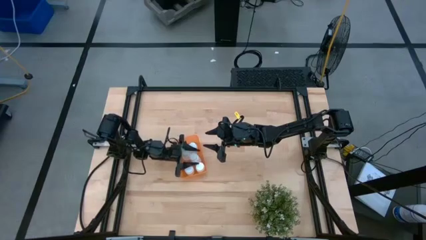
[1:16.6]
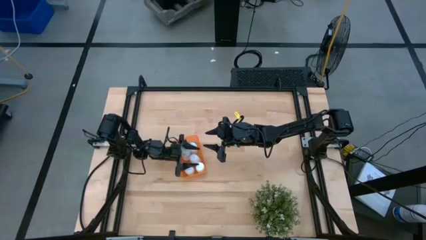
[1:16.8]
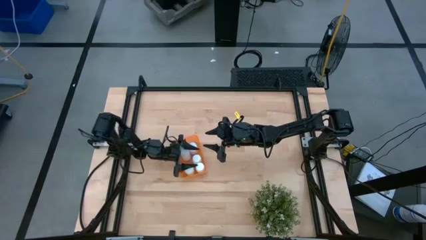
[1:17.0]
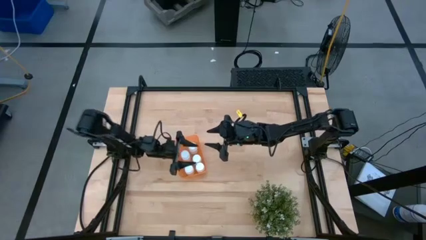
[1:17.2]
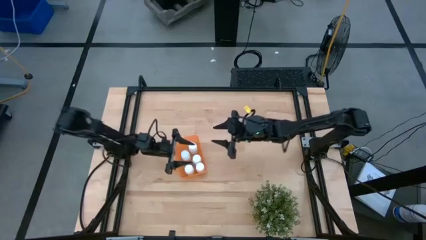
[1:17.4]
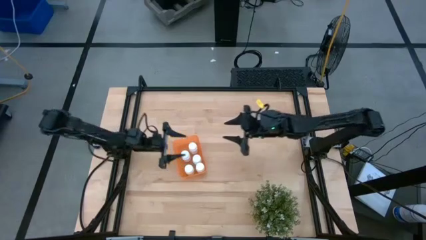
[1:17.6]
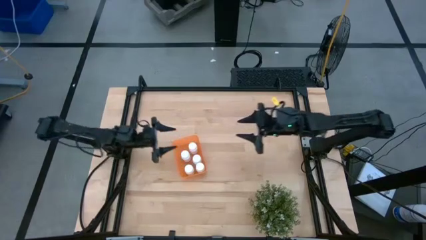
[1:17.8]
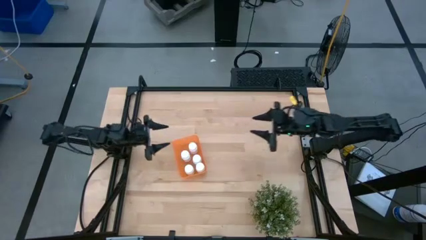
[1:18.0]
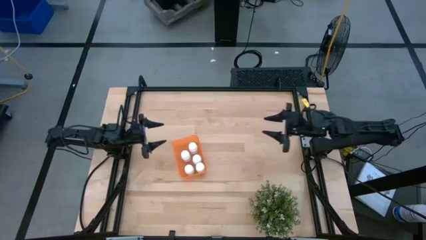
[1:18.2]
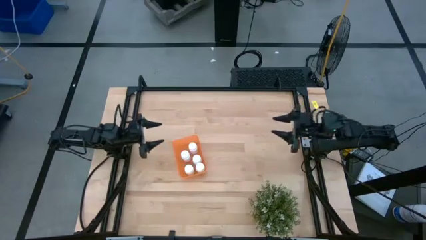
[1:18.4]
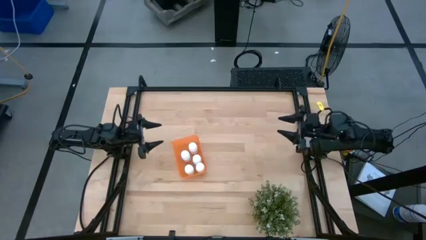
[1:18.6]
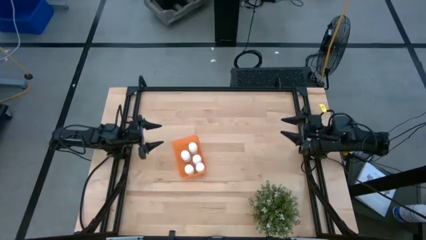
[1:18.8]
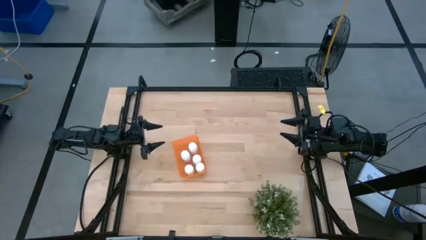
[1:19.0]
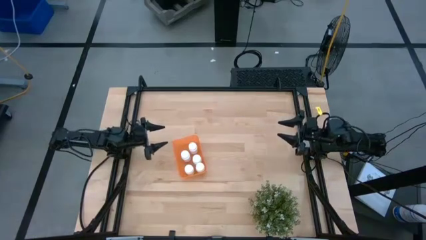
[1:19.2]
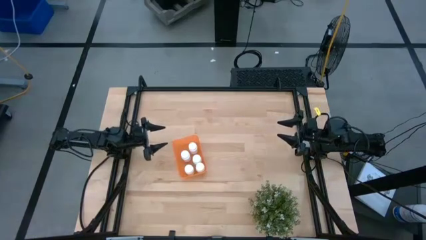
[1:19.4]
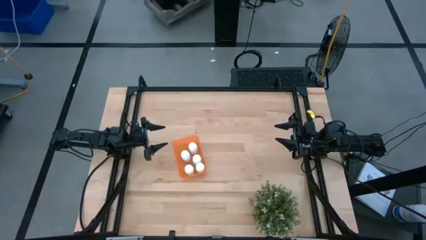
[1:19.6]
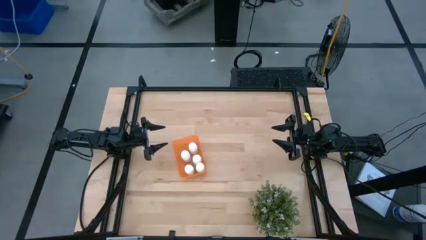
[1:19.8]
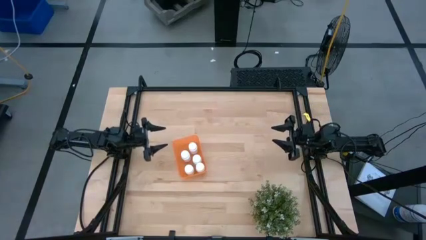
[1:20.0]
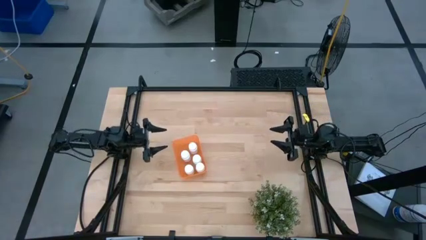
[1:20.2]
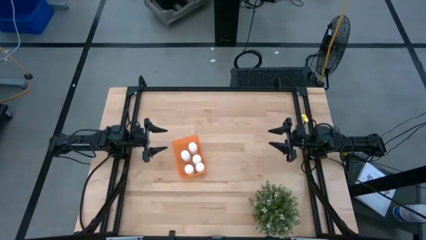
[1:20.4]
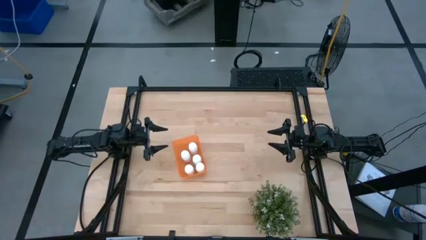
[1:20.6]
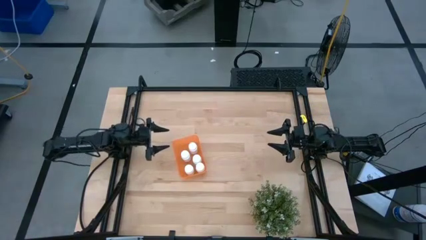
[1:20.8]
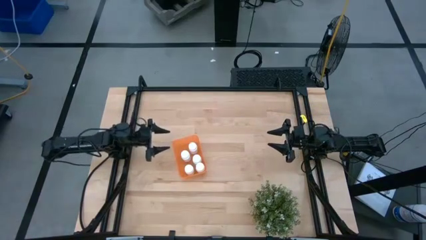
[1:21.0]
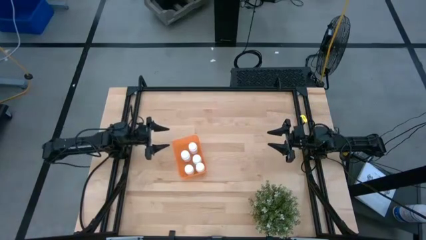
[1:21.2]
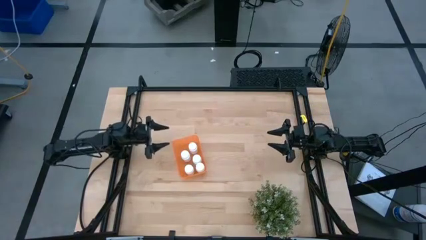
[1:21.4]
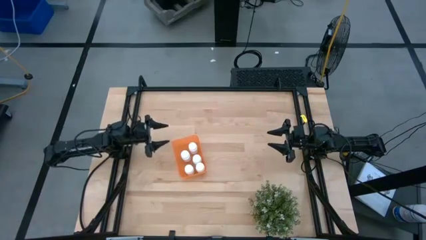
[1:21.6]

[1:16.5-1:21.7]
Task: Pick and place pill bottles into a basket
Return to Home Position

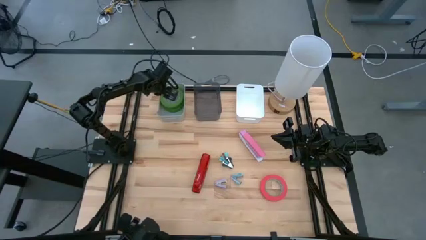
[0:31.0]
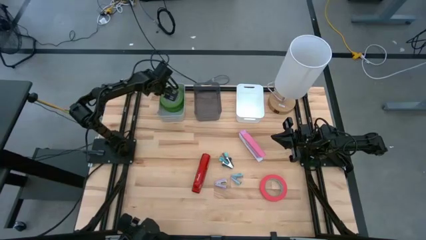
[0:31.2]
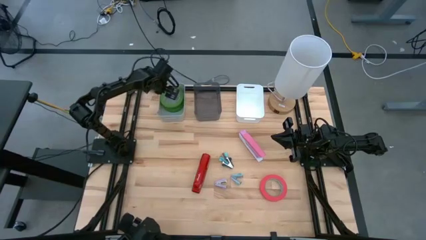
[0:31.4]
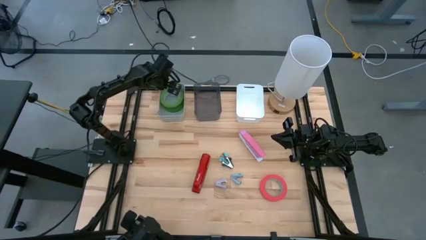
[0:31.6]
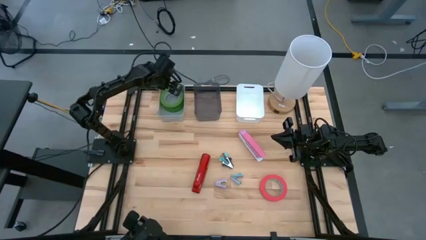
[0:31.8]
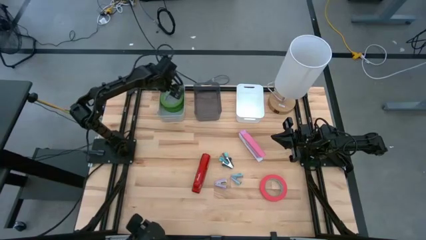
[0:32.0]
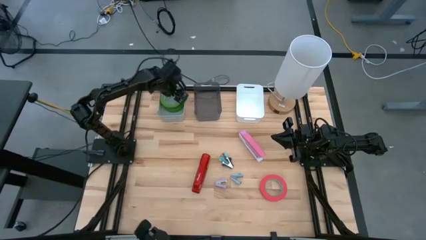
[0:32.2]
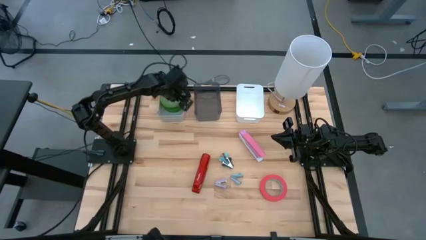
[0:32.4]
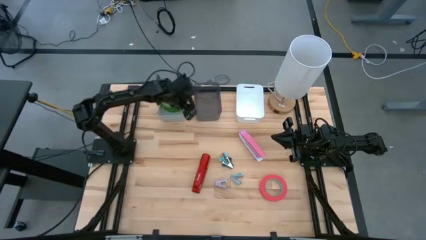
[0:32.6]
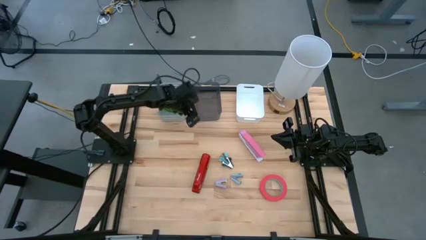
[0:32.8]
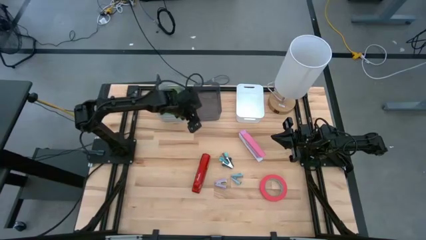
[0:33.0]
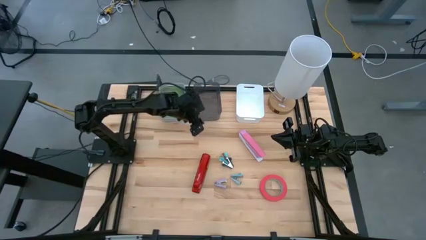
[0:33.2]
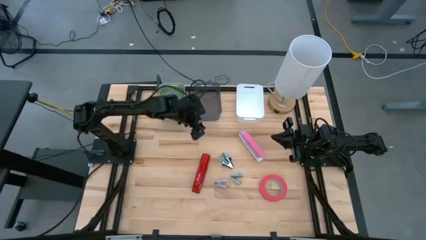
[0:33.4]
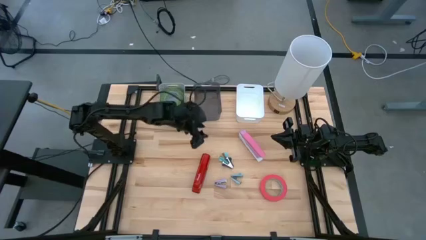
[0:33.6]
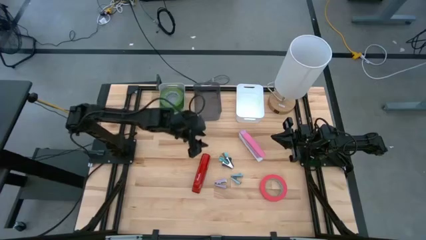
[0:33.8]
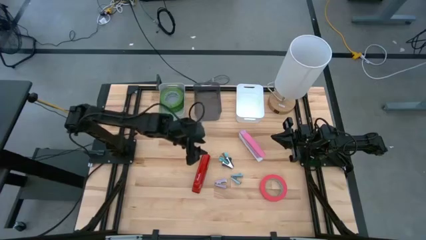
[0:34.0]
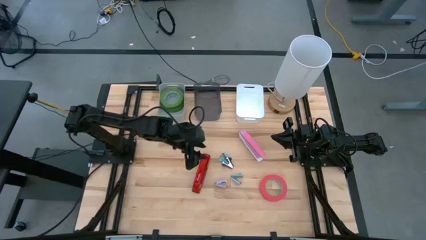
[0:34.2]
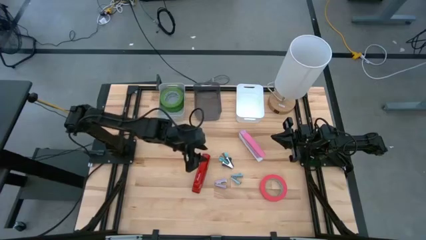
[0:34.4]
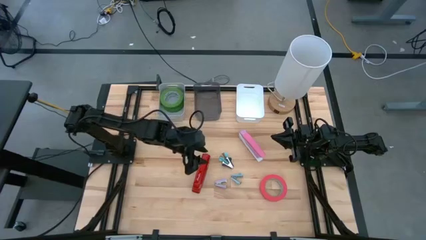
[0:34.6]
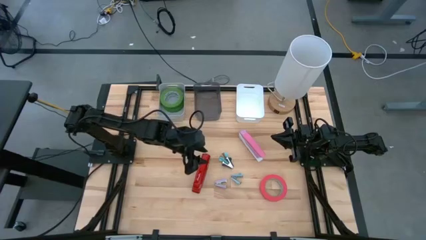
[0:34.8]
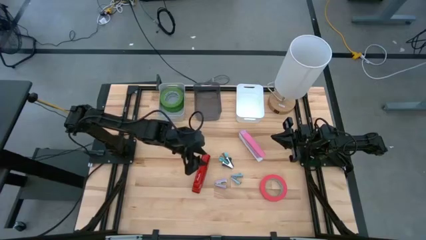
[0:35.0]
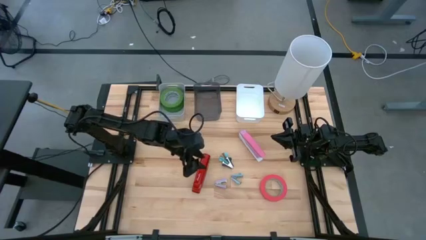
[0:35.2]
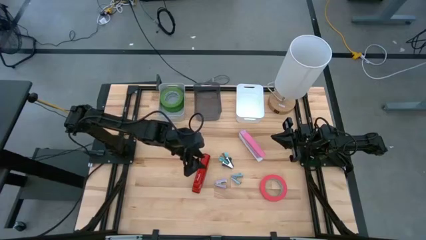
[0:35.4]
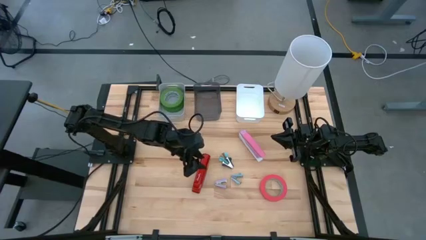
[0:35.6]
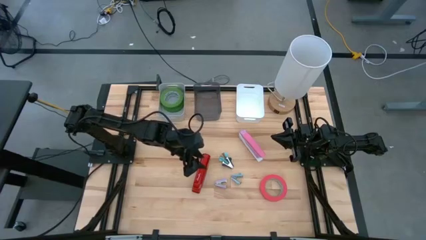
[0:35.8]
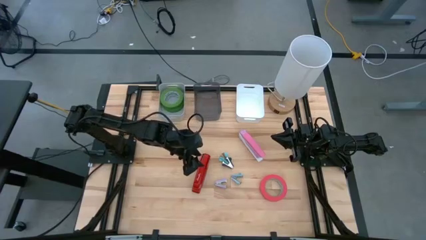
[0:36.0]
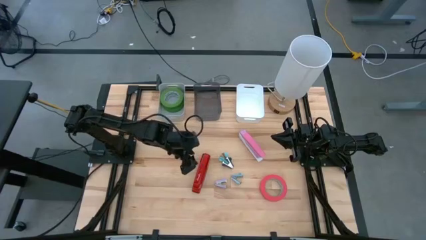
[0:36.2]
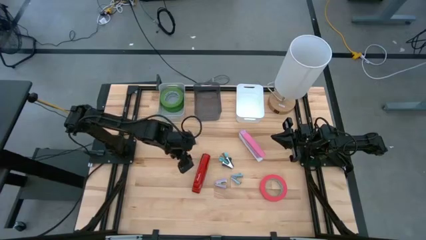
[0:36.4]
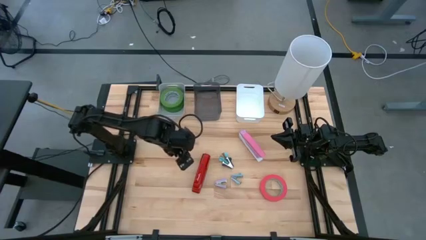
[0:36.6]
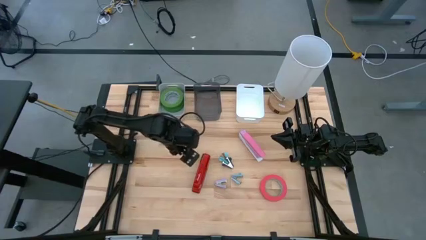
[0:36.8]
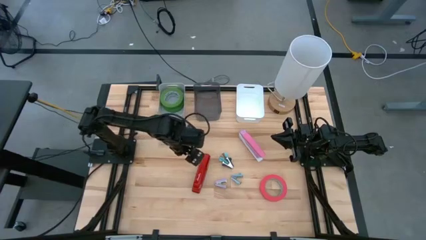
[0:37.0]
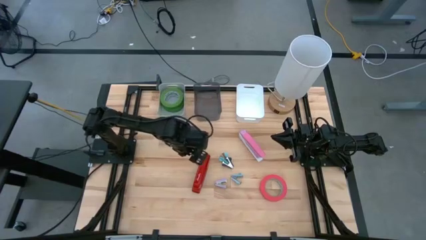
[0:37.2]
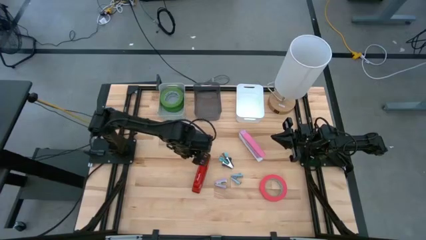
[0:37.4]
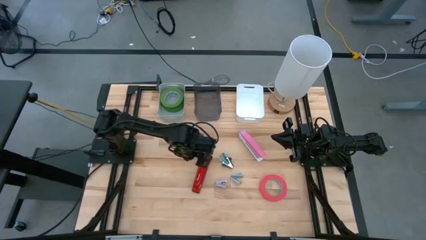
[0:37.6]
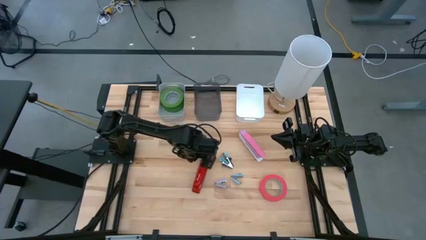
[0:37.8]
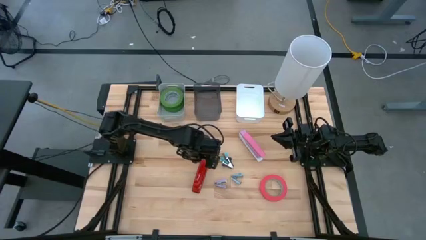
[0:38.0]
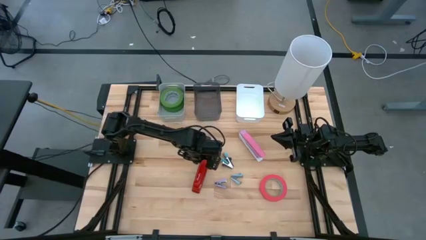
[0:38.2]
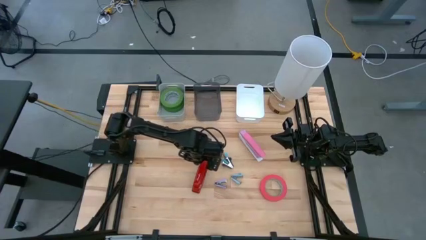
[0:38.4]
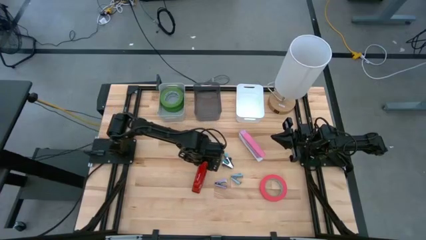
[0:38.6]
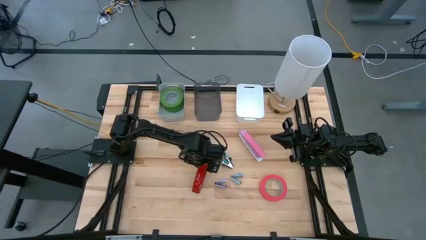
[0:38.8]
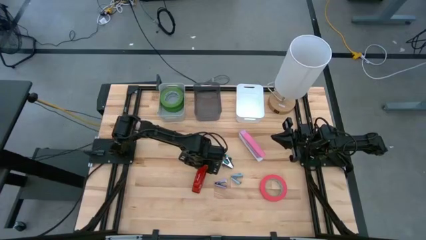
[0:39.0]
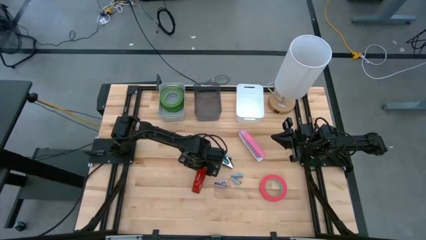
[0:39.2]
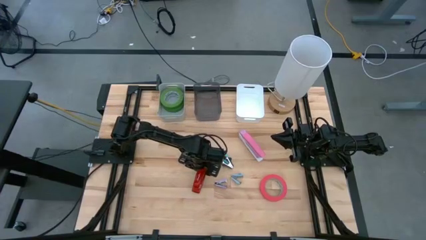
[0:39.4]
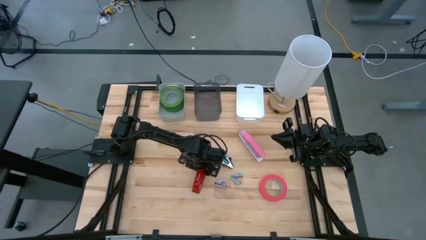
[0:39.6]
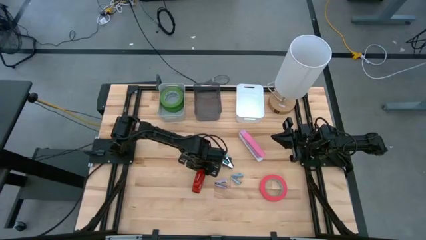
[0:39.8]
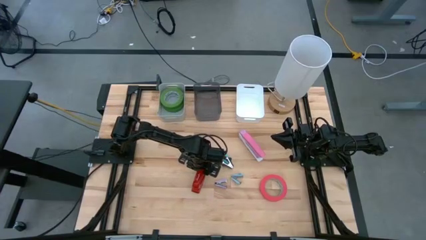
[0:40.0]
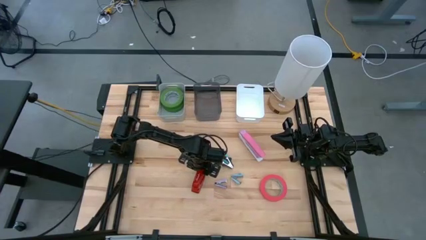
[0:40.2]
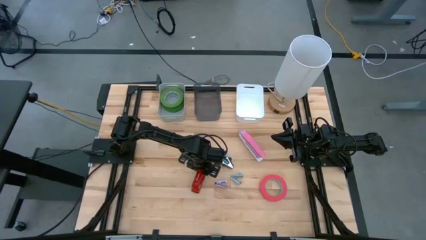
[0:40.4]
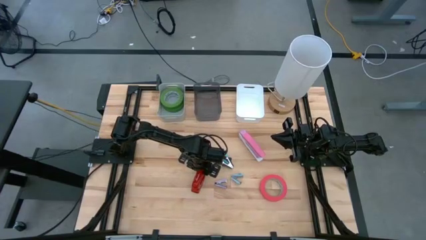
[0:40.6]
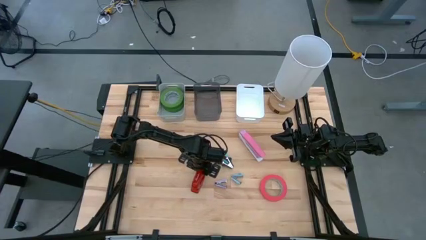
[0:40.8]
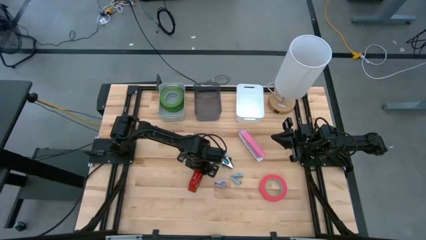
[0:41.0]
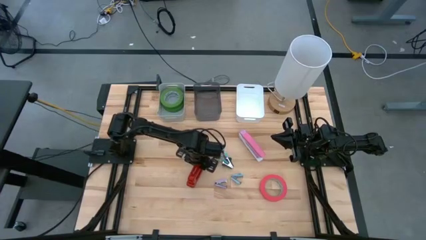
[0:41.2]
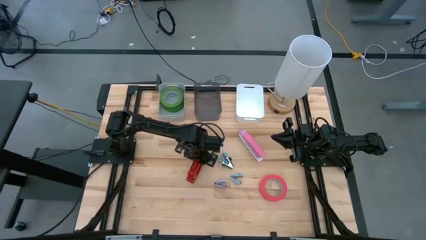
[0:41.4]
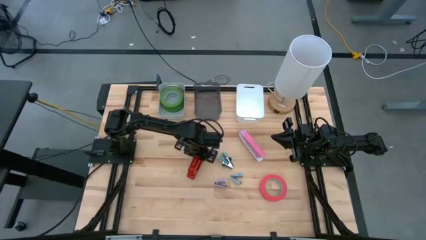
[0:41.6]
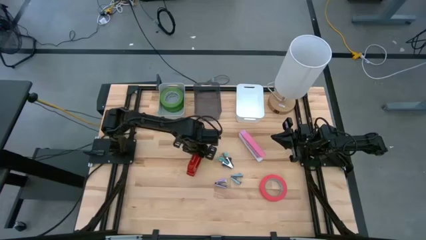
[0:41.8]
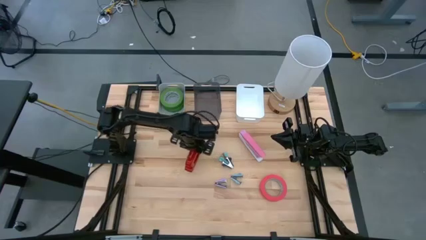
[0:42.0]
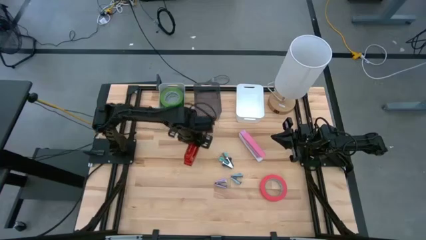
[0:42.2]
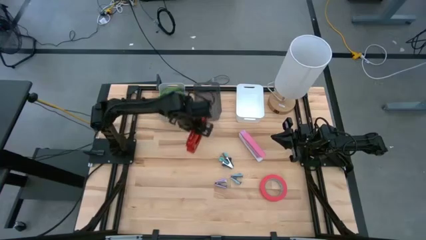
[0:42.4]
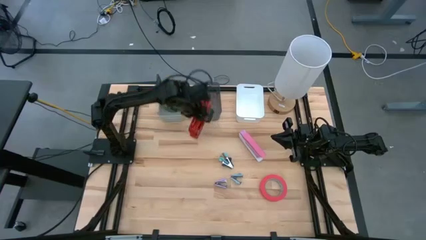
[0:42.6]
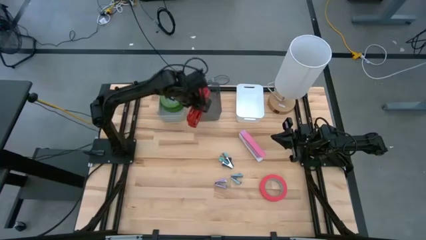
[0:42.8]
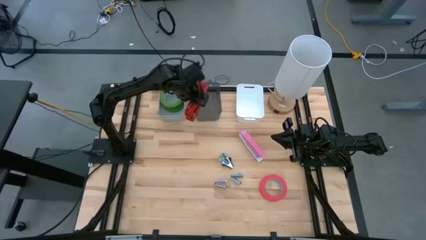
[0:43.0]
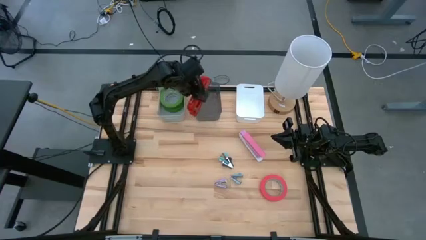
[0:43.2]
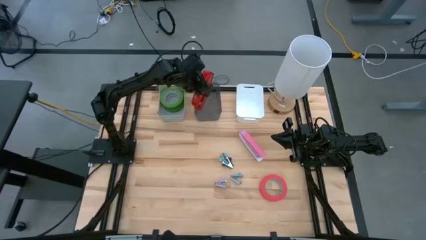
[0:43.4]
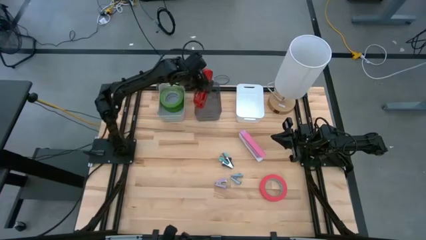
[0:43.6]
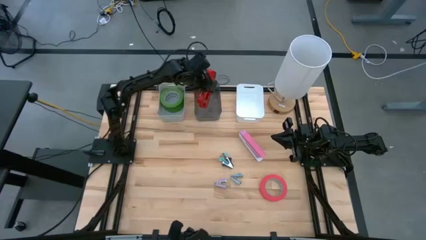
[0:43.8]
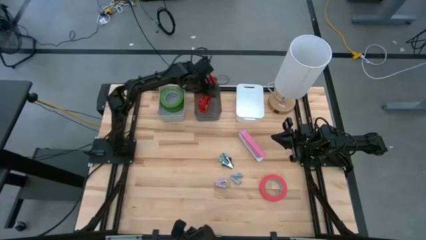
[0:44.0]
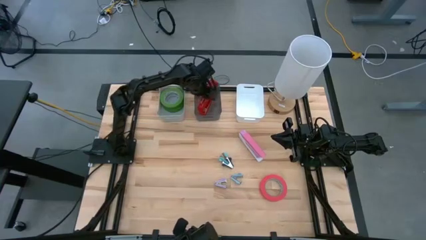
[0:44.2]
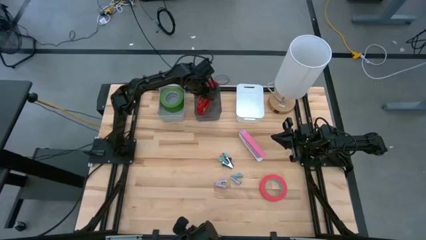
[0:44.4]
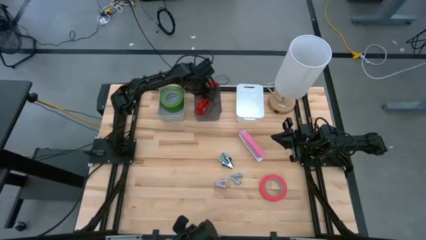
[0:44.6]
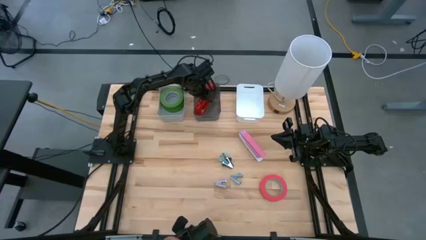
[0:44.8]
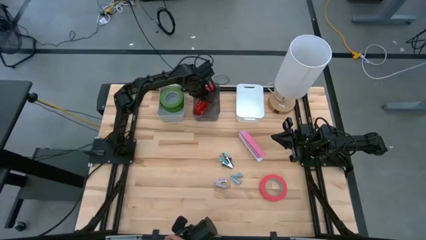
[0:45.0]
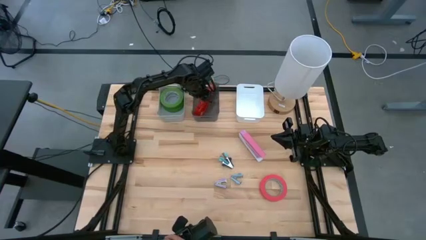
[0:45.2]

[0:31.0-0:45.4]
Task: Pick and place Stapler, Stapler remover, tape
Put the red stapler into the black bin
